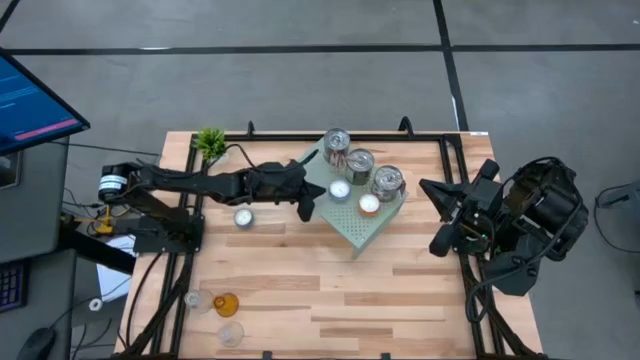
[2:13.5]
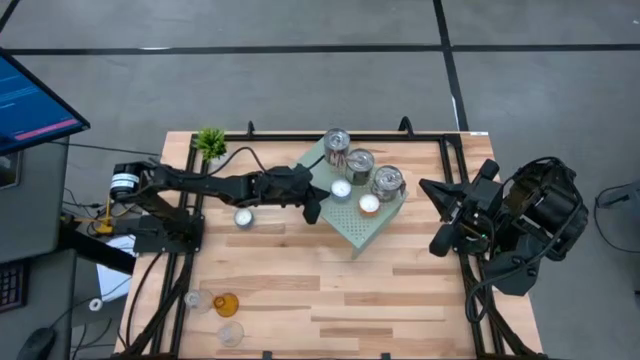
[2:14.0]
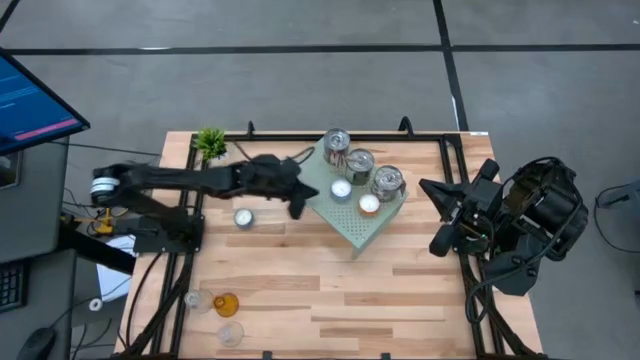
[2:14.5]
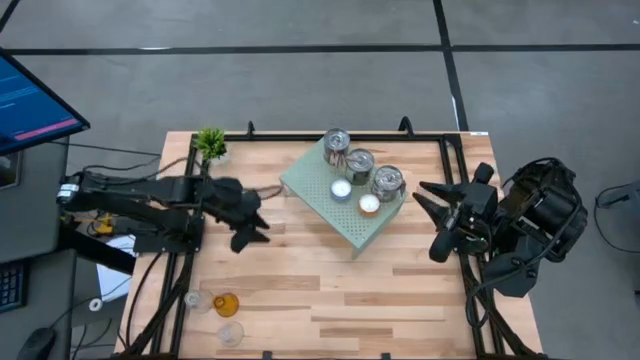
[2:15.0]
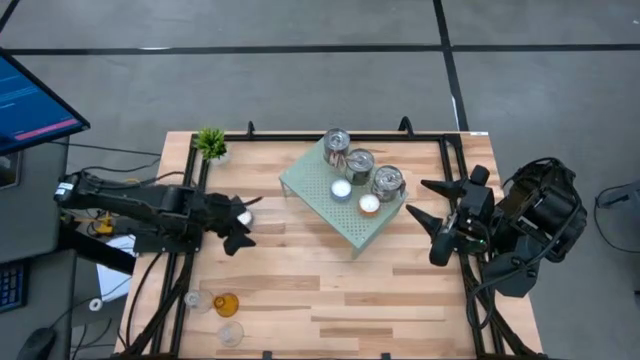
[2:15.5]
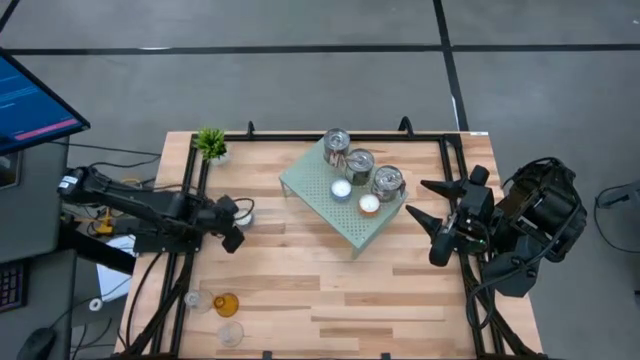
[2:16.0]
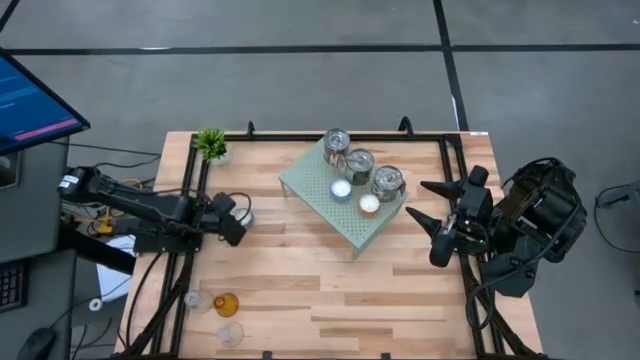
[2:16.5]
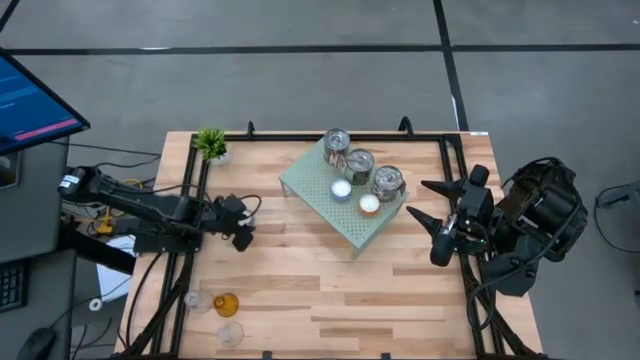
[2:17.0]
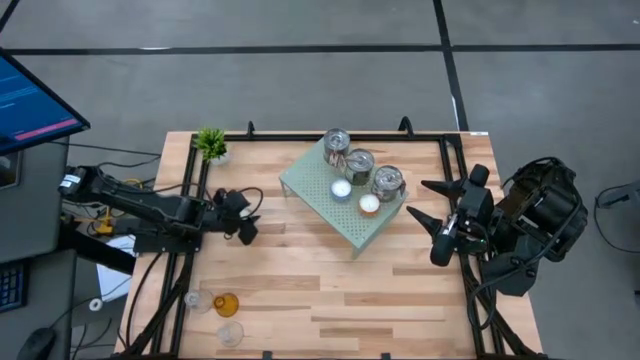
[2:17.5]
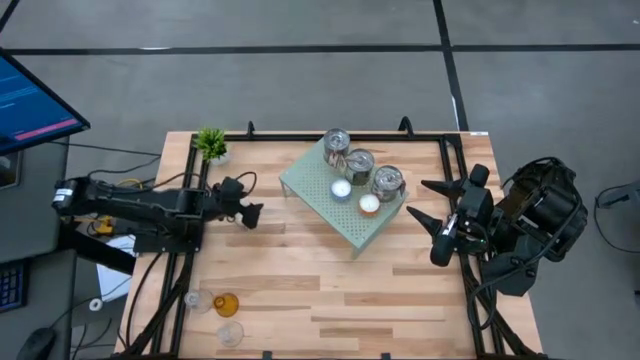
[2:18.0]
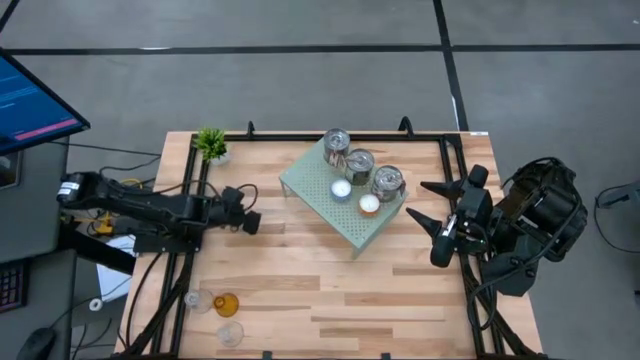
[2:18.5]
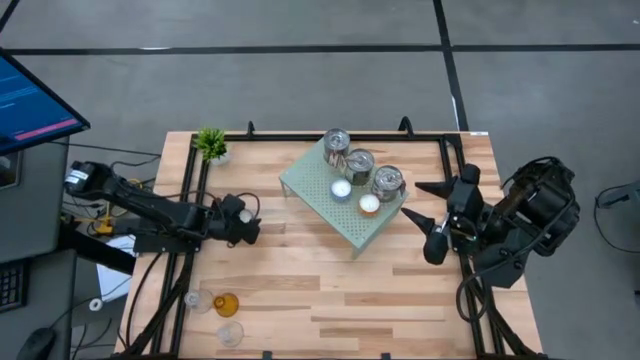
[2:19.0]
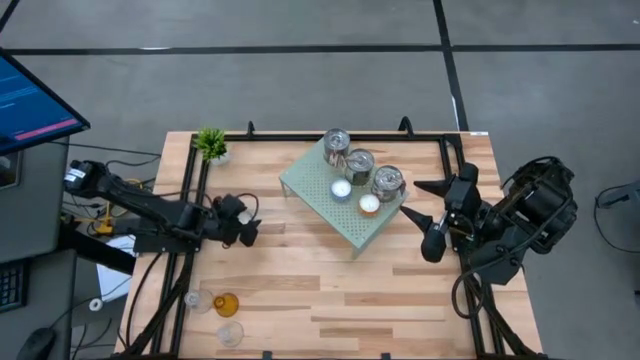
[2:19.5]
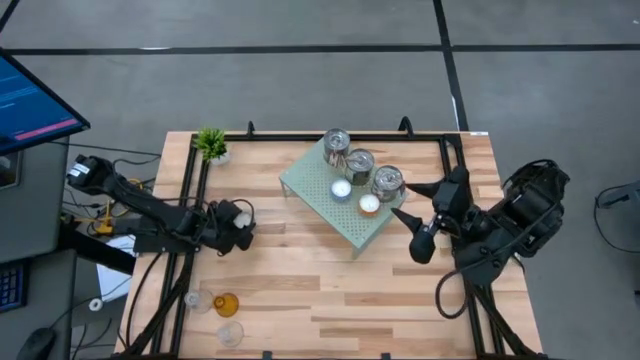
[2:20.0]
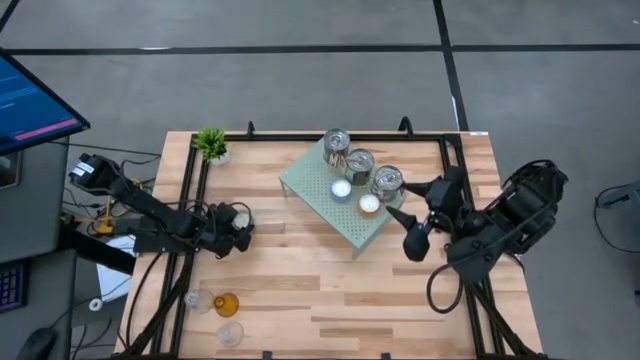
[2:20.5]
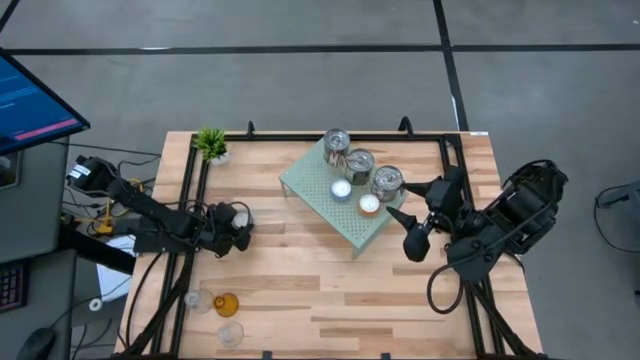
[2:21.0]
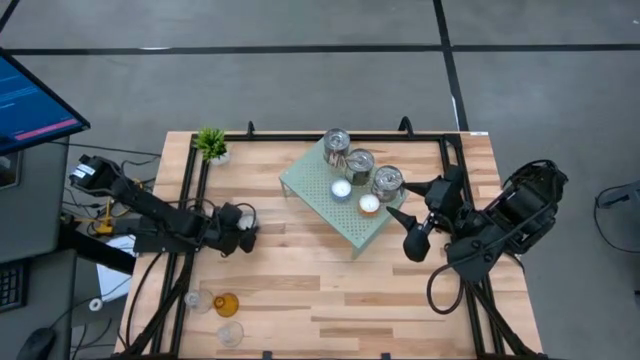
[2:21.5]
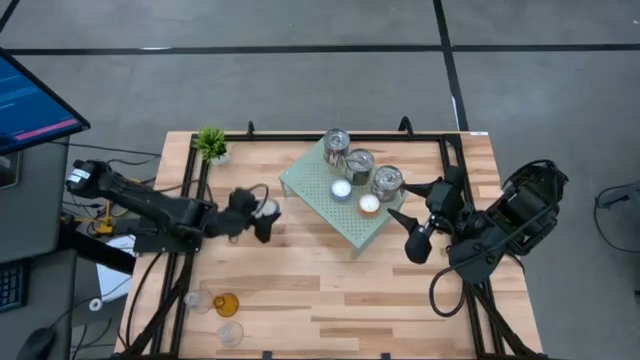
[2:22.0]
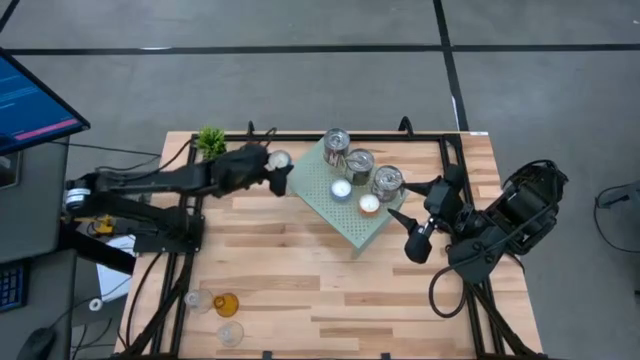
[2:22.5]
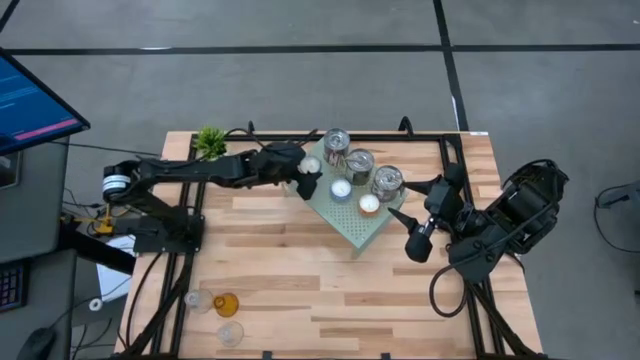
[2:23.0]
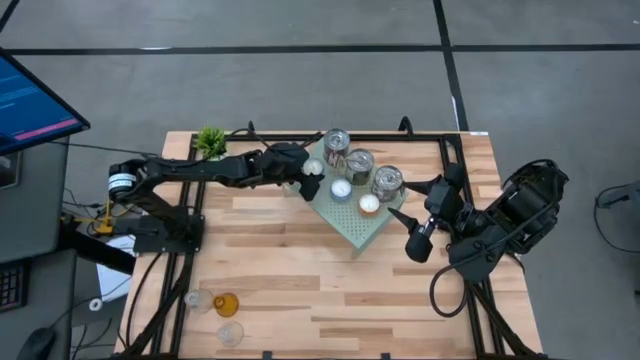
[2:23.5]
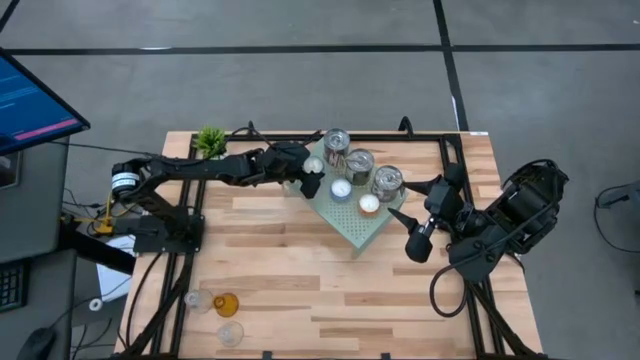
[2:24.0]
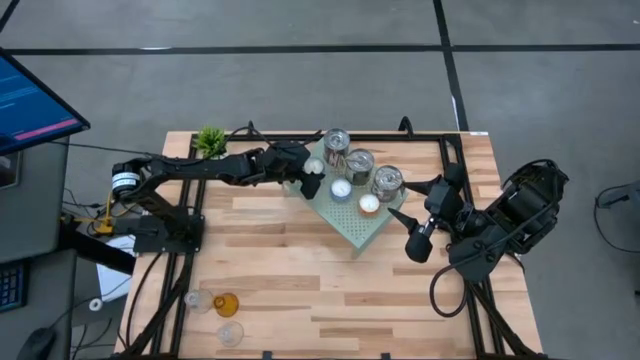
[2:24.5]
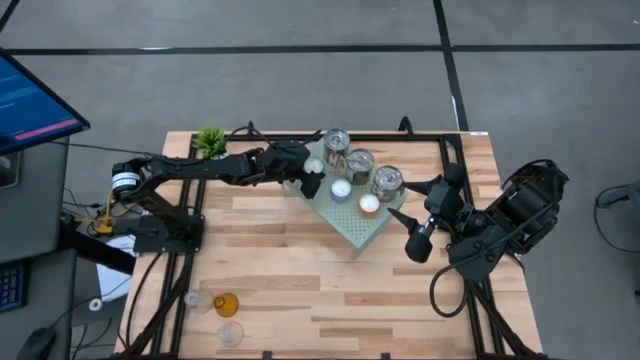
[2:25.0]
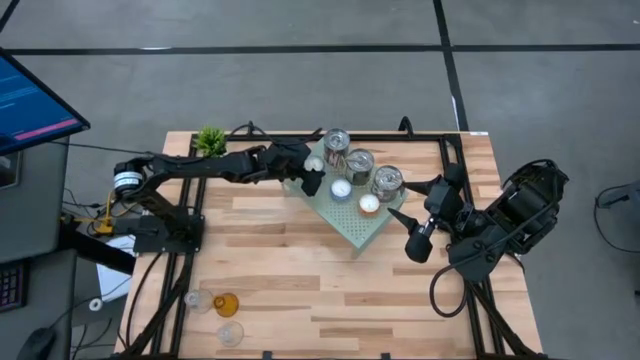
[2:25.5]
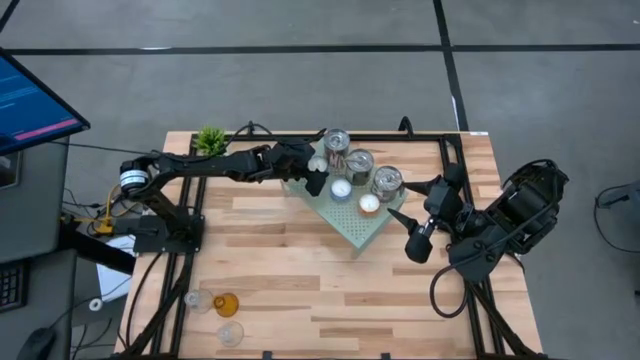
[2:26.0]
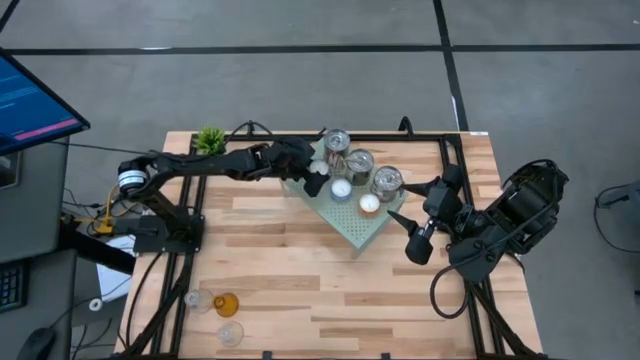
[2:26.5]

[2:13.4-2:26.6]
Task: Stock candles on shelf
Put the blue scented candle on the shelf

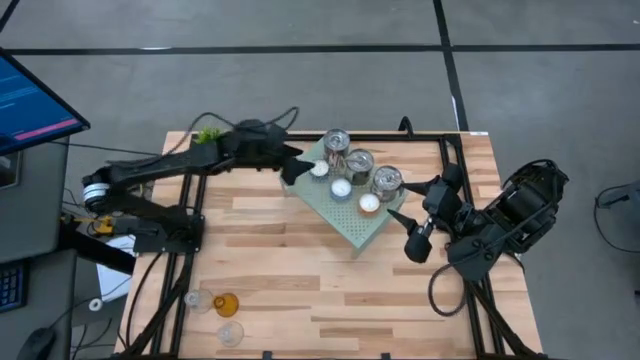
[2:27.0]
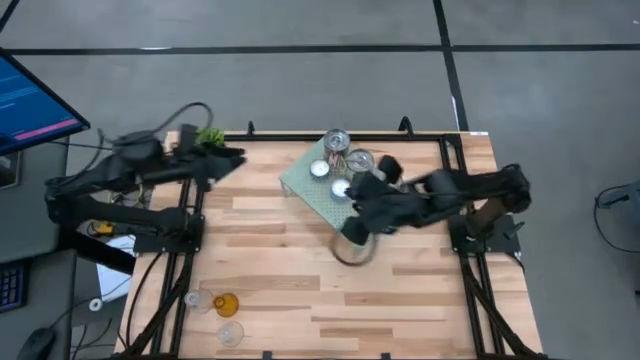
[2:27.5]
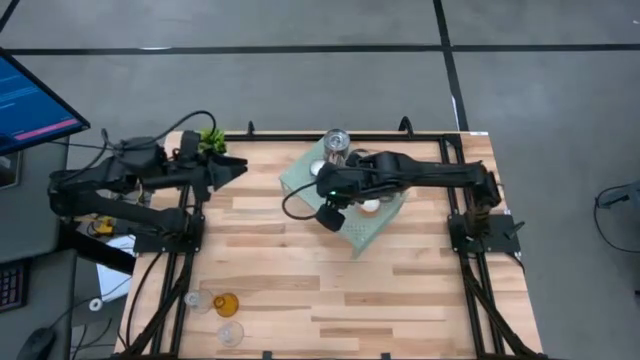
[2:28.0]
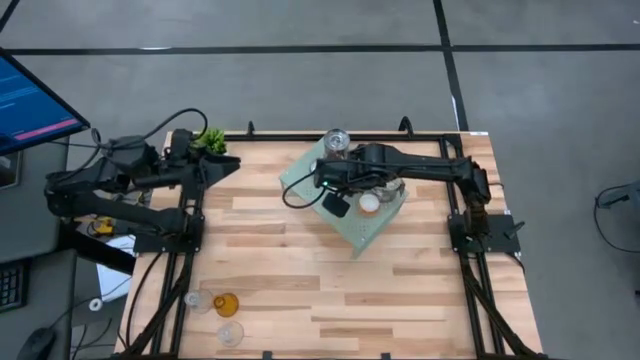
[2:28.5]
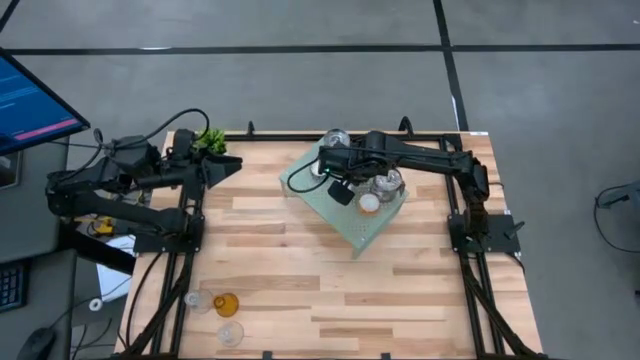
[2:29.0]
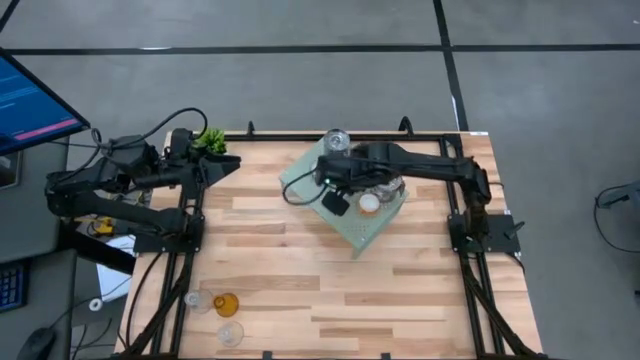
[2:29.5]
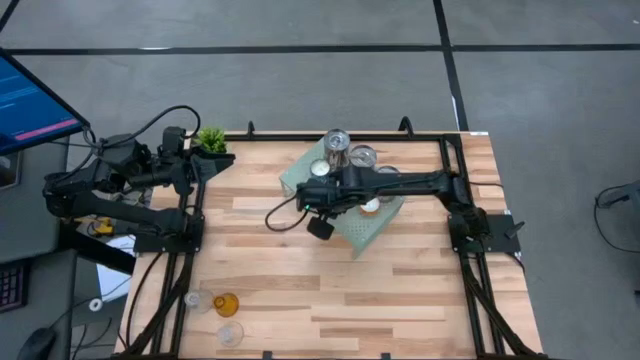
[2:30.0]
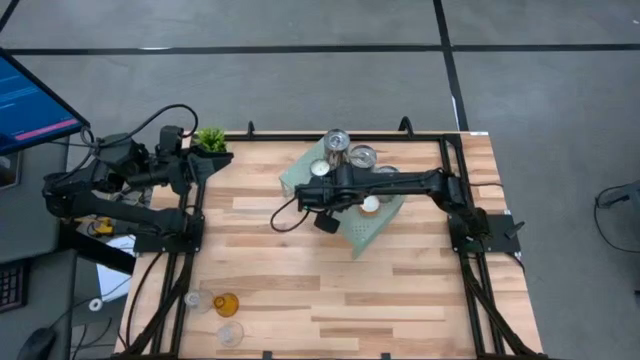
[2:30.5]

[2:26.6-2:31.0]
Adjust the scented candles on the shelf

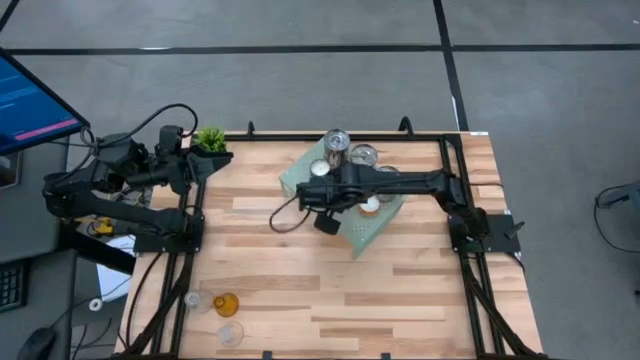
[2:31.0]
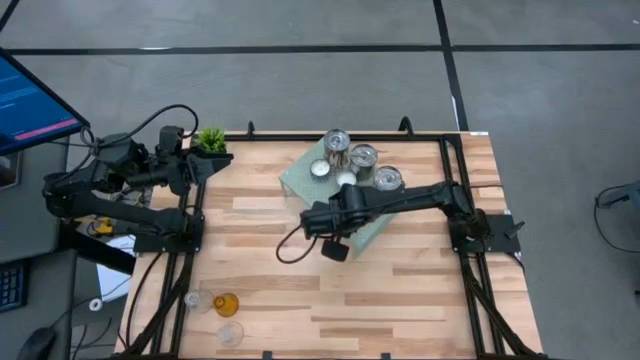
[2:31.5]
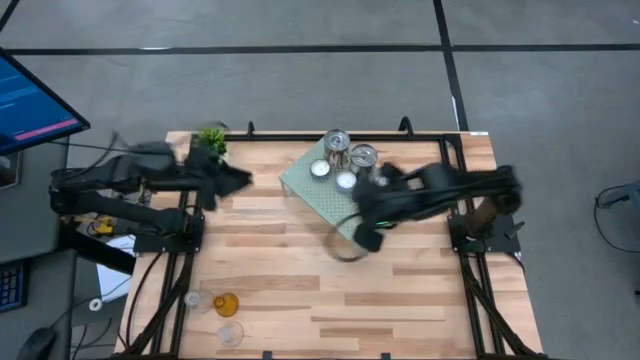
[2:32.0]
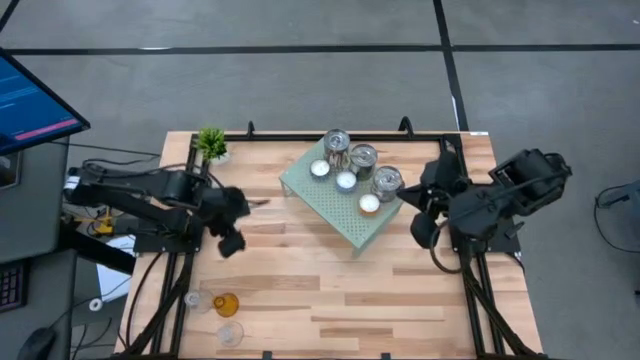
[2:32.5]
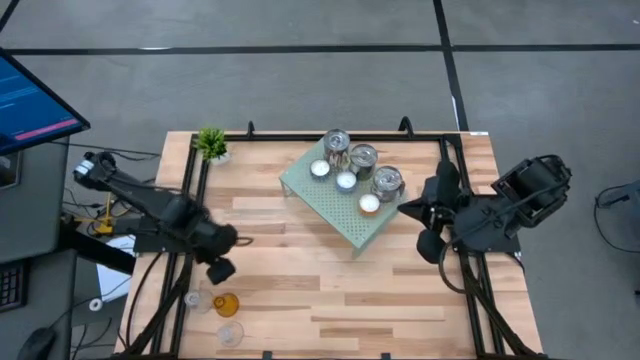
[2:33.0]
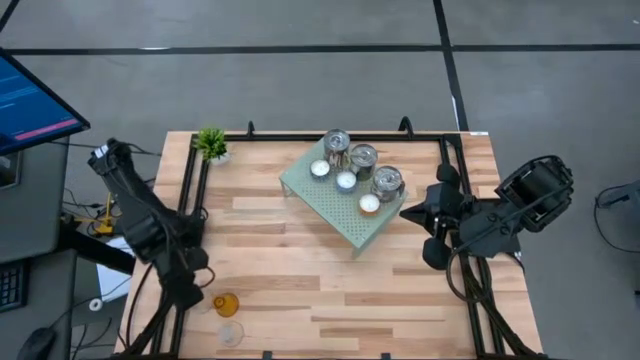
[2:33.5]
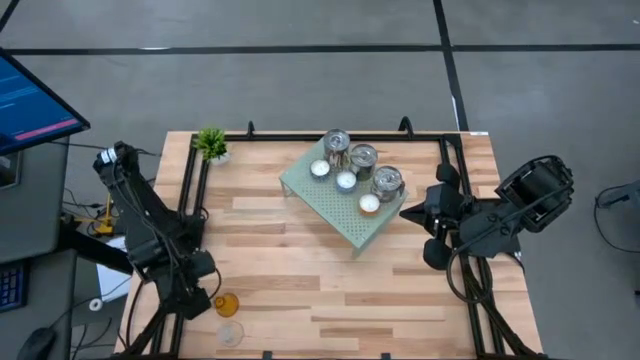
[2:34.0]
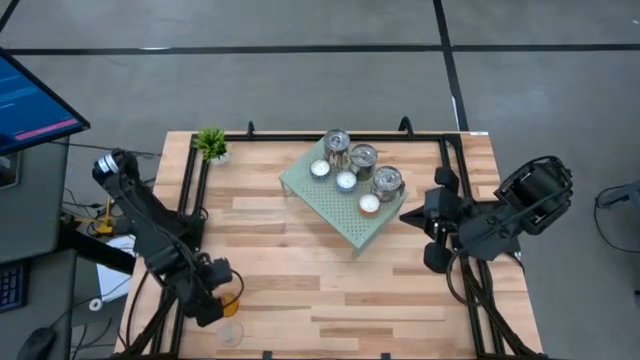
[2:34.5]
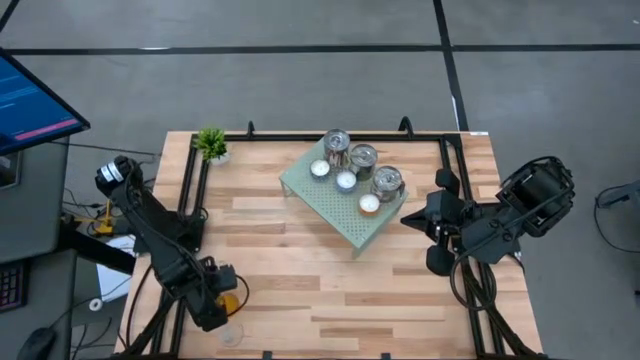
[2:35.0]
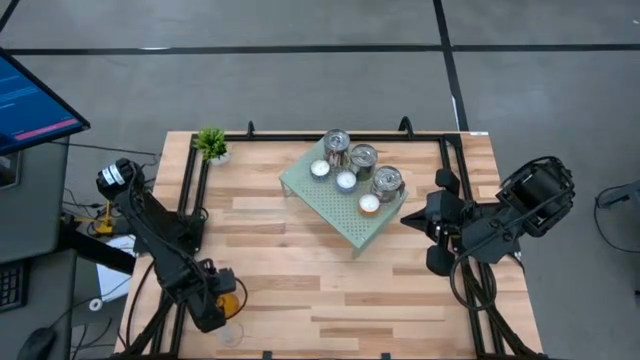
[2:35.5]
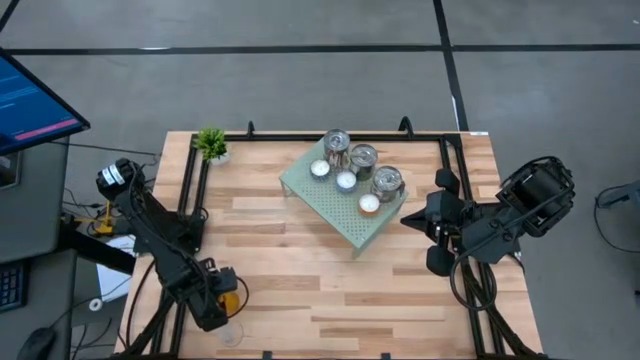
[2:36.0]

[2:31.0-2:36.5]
Put the orange candle holder on the shelf
